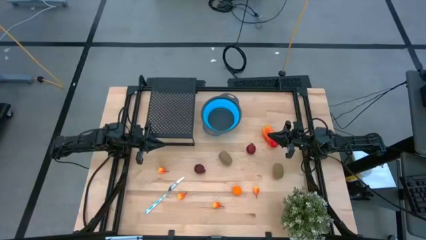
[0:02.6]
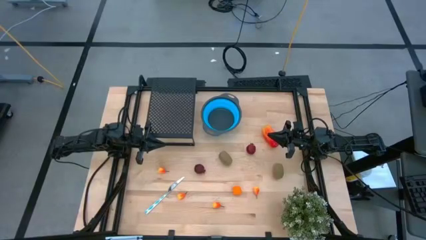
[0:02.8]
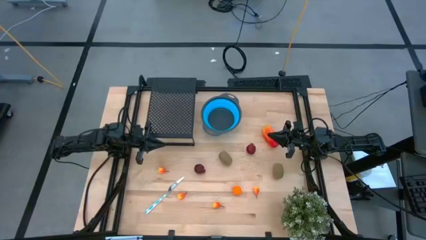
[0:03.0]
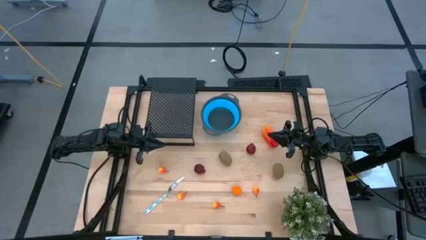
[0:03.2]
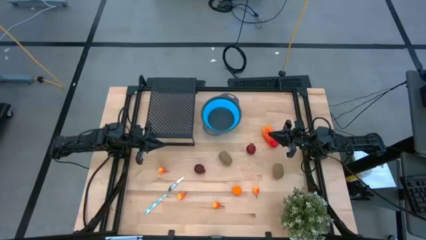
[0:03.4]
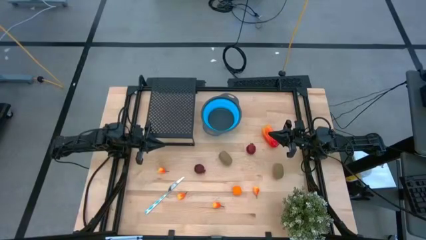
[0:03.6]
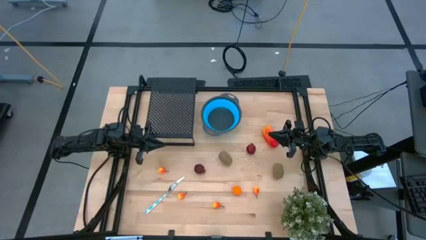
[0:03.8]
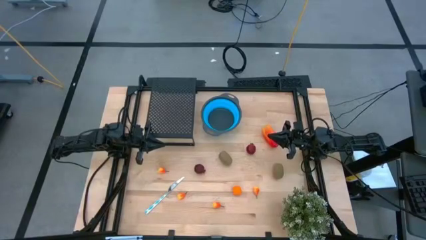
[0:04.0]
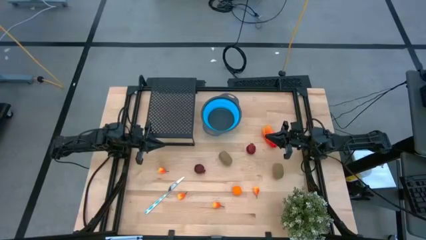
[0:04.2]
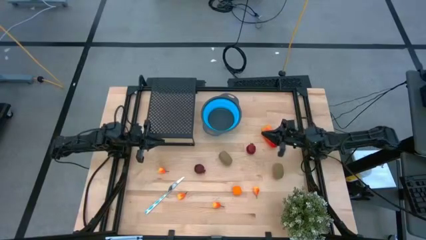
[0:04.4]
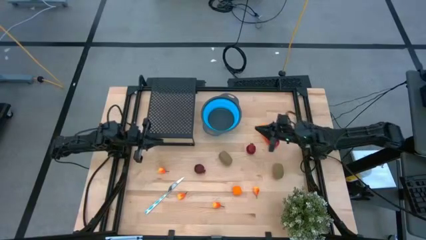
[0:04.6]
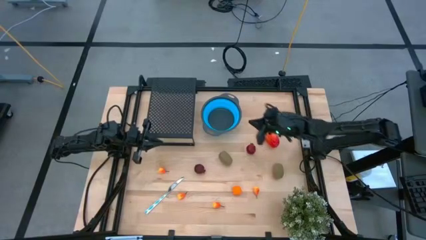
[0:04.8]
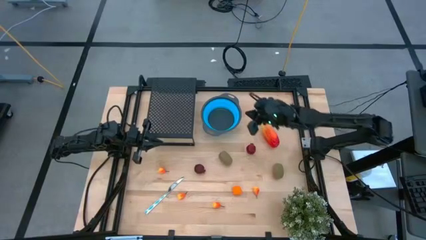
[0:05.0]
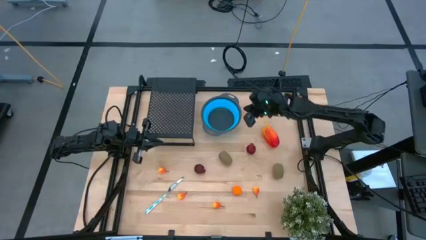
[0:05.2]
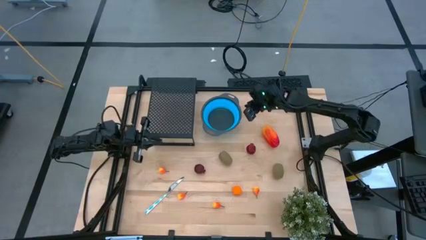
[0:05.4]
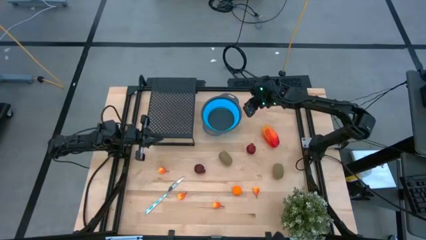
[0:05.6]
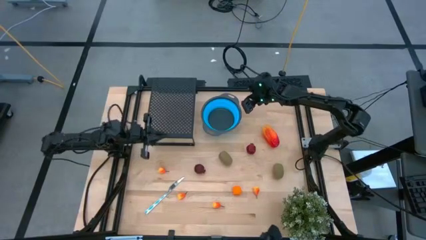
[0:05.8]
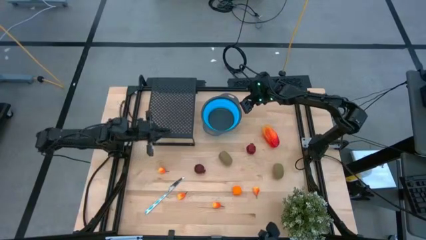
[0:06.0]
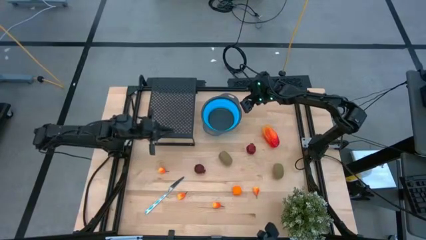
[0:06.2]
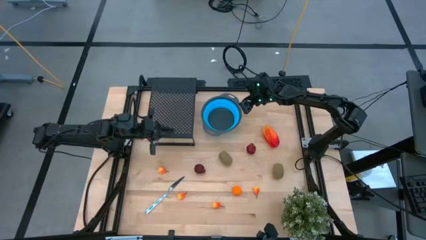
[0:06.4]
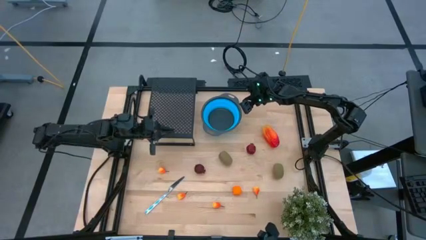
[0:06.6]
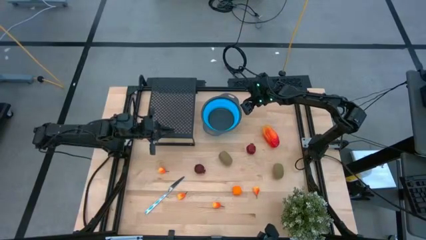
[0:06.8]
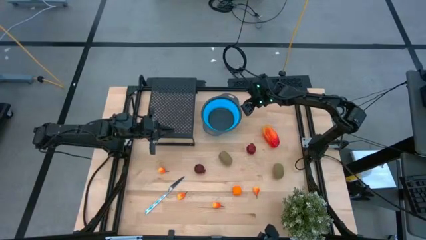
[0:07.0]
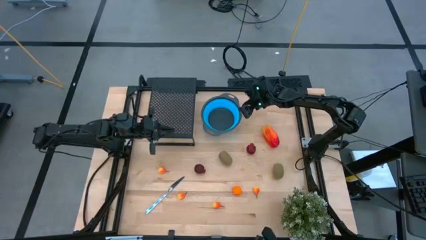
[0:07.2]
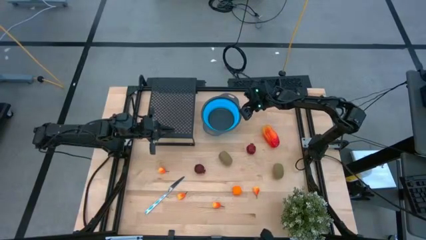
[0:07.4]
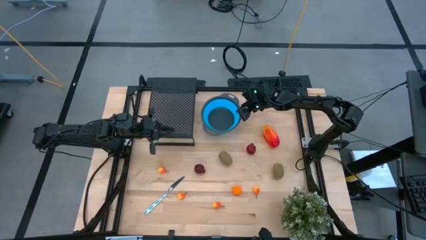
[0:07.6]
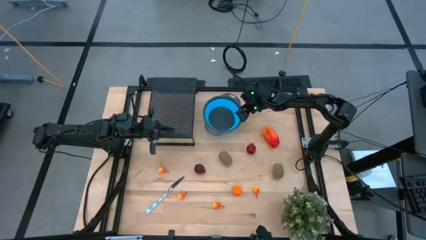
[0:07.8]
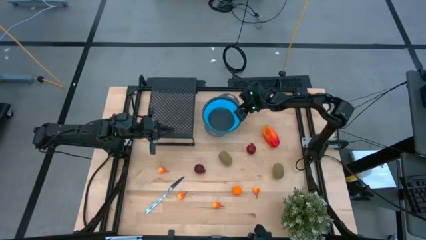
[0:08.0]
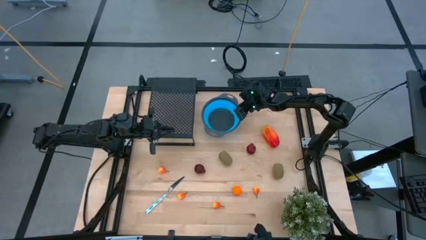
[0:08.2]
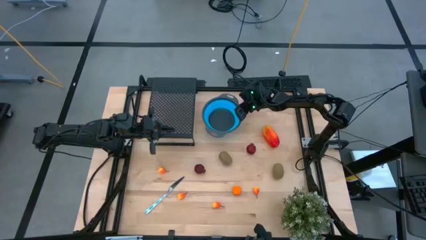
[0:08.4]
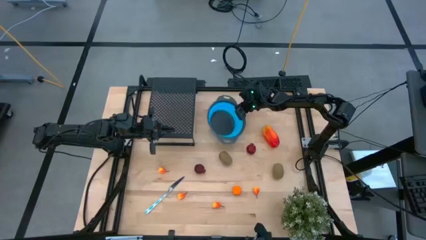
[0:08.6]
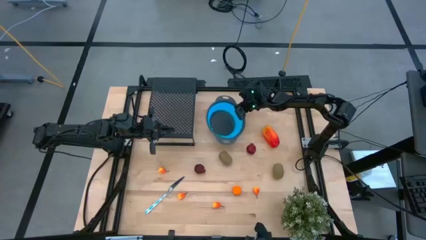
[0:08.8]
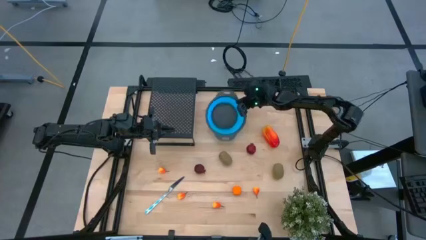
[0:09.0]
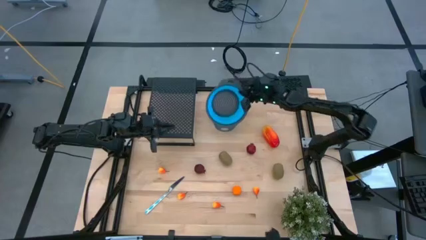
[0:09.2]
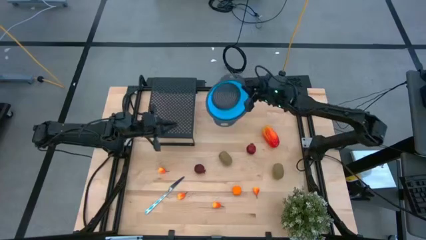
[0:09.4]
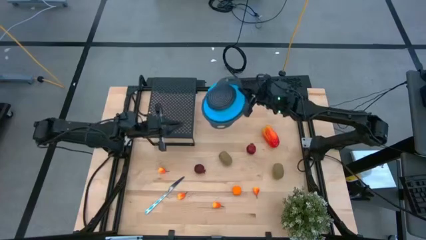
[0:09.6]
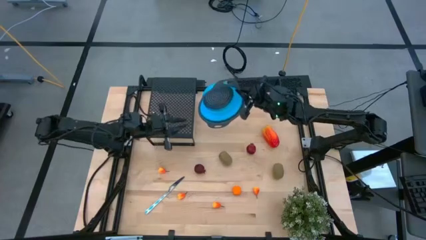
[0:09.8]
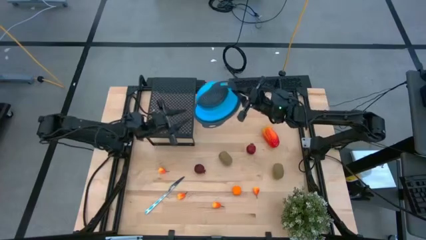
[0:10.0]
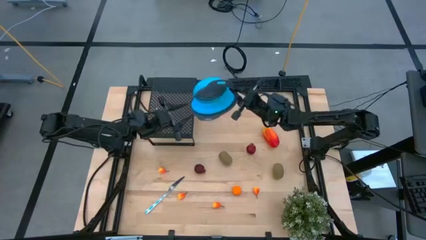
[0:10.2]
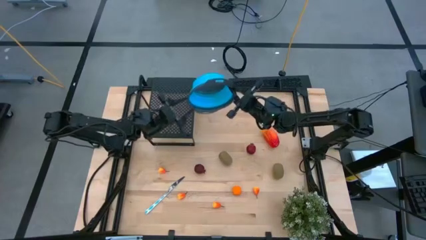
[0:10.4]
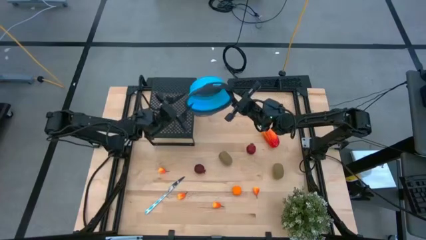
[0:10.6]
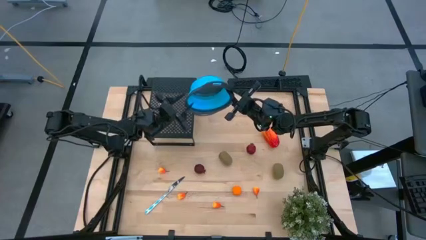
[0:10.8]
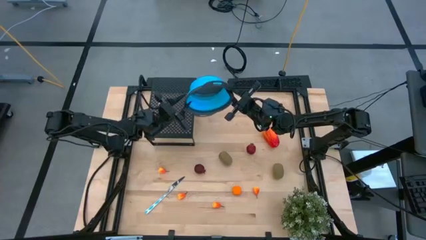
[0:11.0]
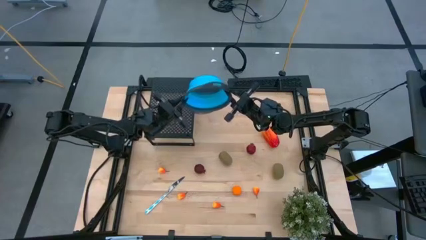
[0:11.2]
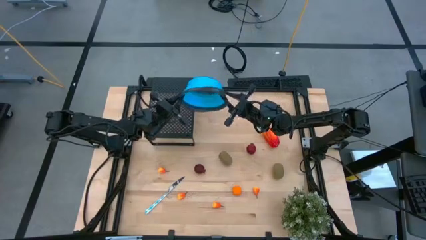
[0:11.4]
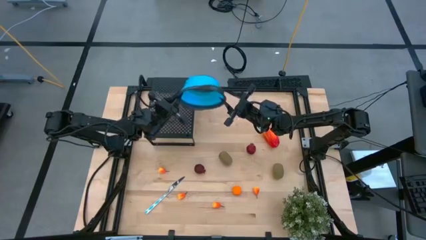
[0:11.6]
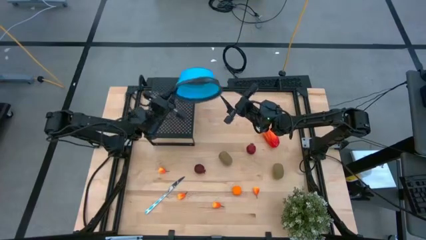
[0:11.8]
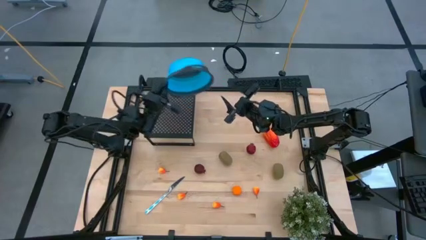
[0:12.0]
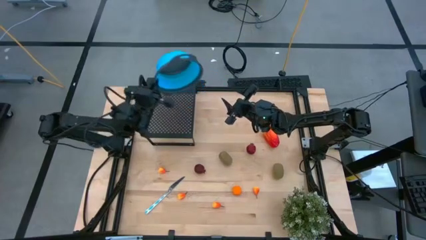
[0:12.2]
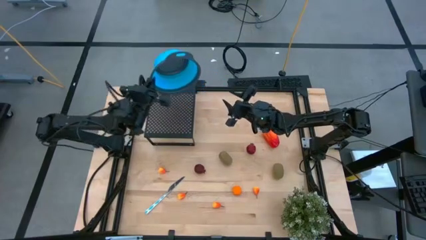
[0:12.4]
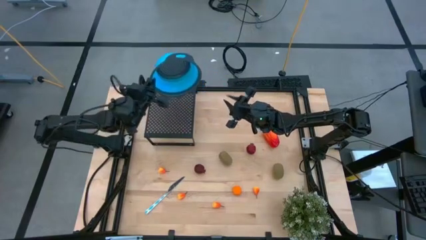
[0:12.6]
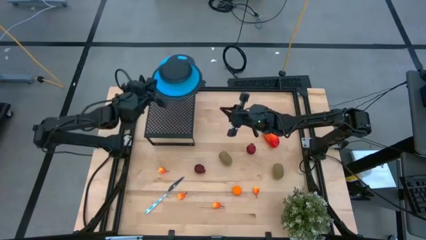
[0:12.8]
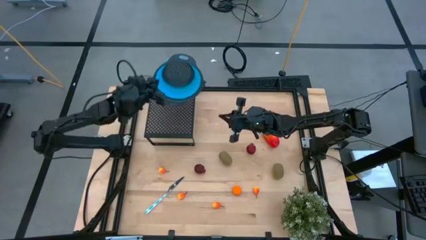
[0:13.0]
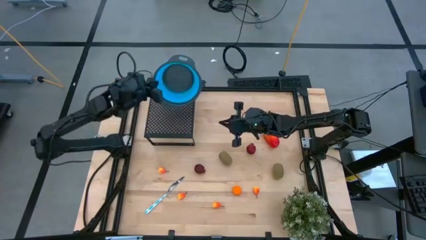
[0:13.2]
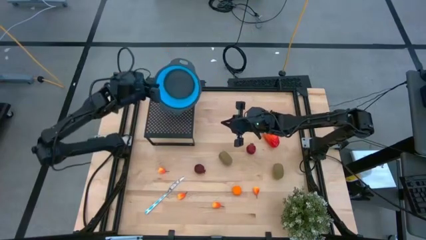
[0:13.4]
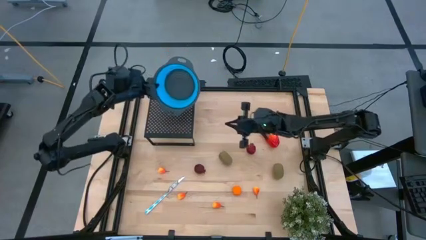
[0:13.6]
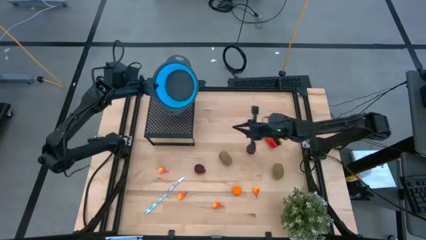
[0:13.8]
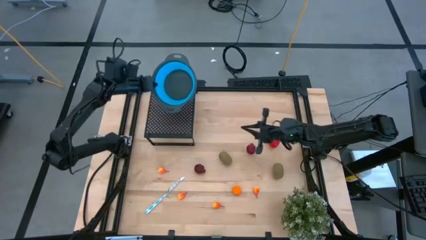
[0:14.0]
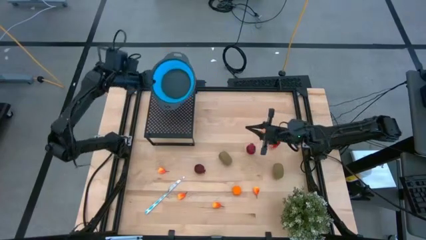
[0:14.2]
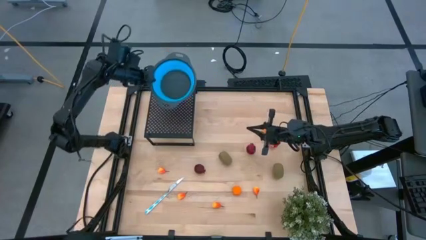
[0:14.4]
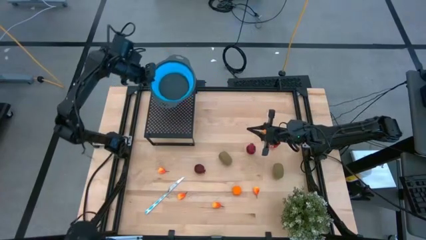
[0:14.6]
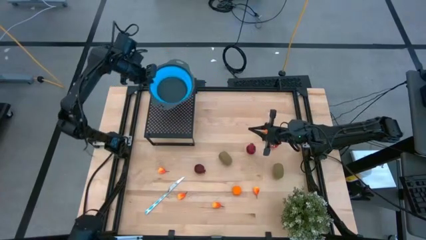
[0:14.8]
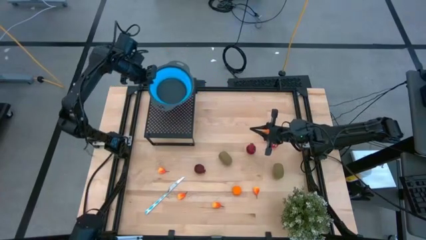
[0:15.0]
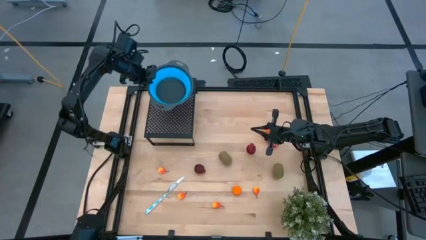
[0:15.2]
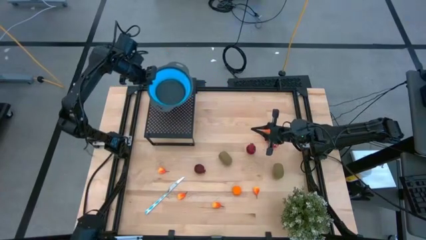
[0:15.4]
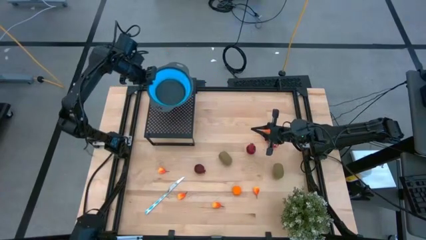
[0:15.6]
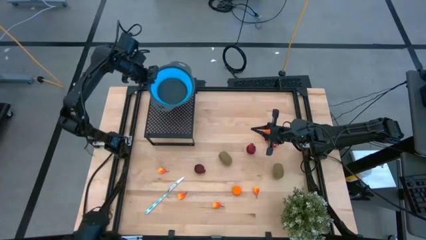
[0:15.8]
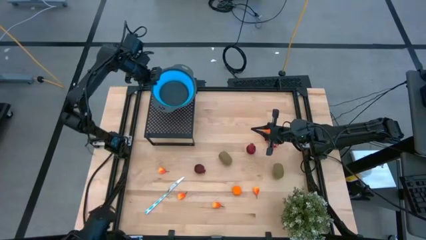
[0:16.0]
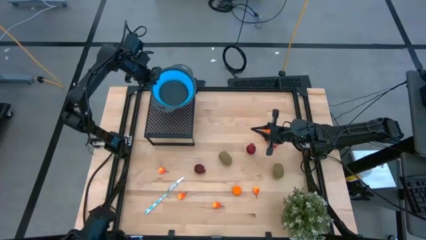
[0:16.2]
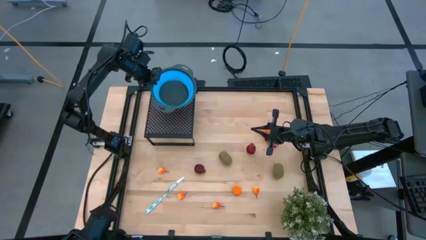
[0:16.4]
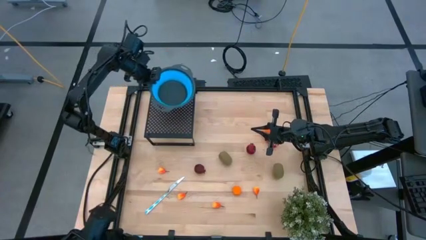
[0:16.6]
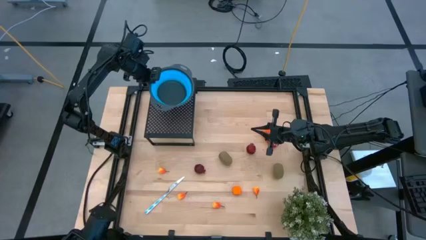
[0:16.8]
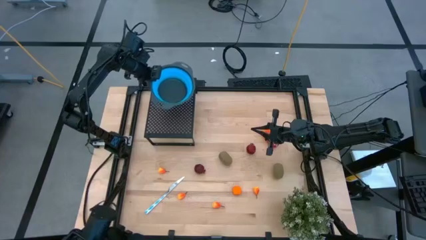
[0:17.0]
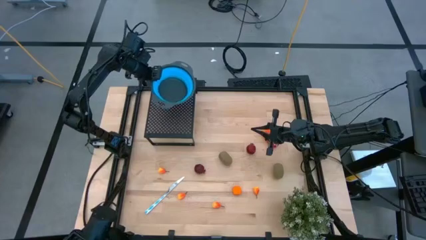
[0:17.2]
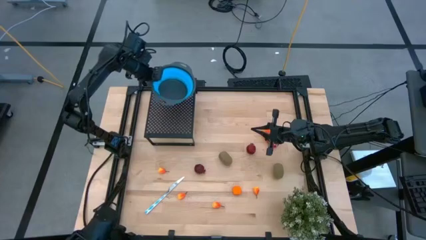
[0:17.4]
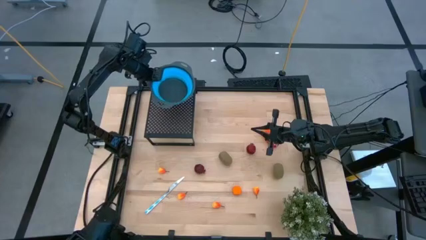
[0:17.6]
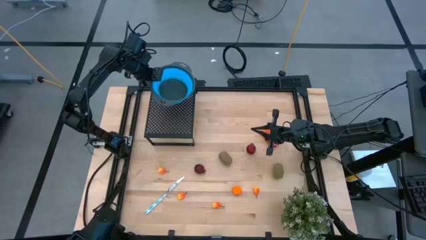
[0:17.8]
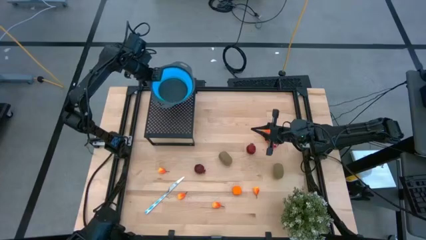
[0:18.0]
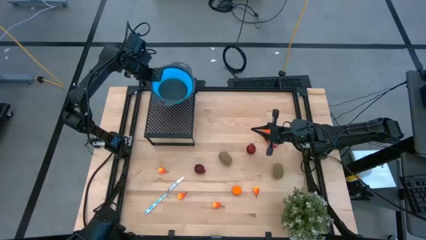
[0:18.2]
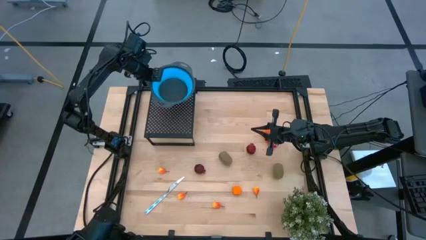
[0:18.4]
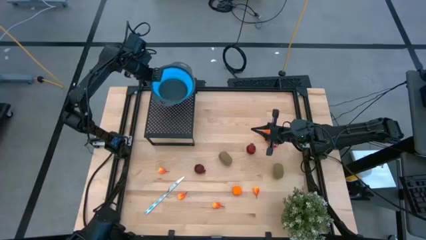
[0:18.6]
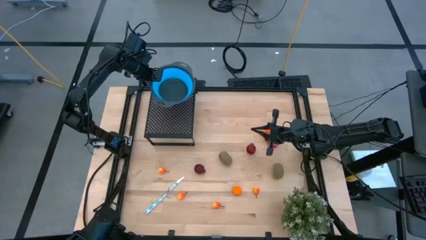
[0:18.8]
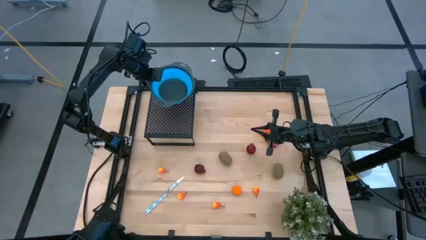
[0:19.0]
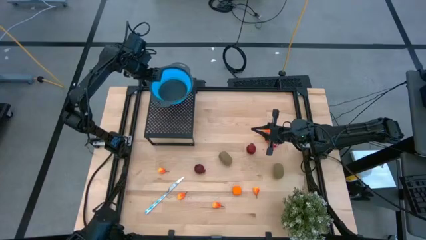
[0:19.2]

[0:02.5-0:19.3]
Task: Pick & Place Fruit
Put the foldable silicon strainer on the shelf
